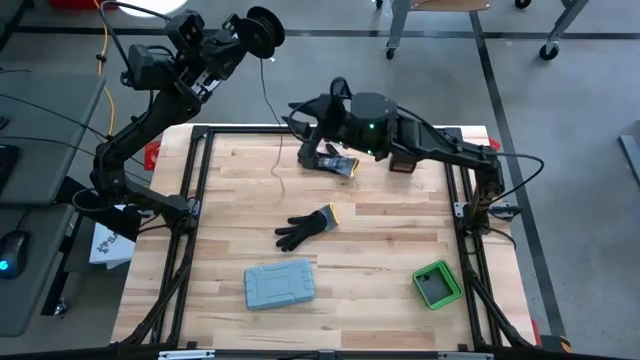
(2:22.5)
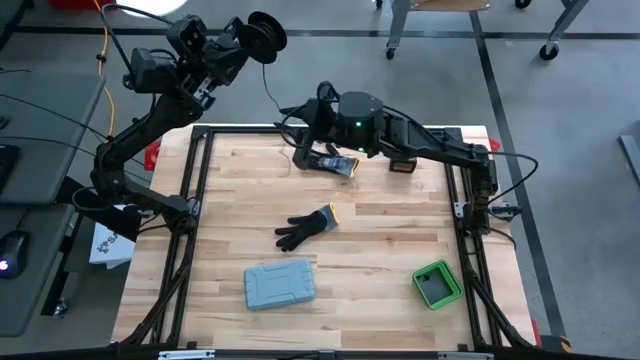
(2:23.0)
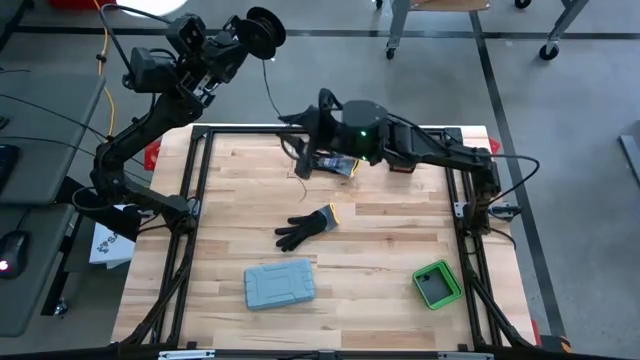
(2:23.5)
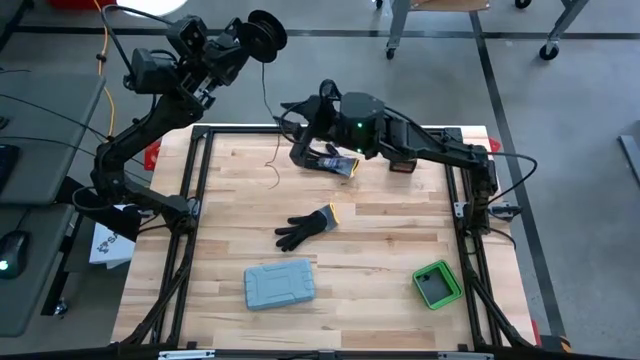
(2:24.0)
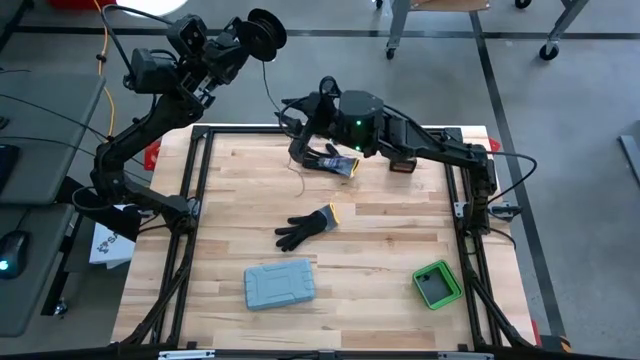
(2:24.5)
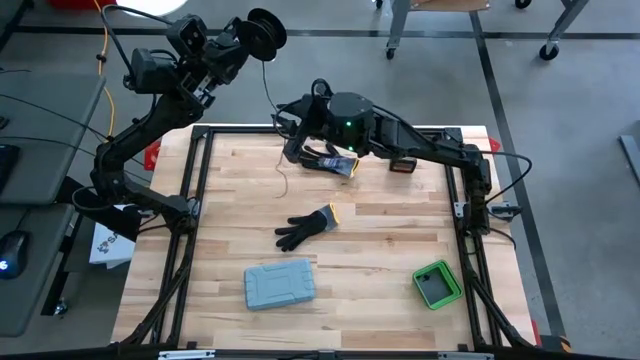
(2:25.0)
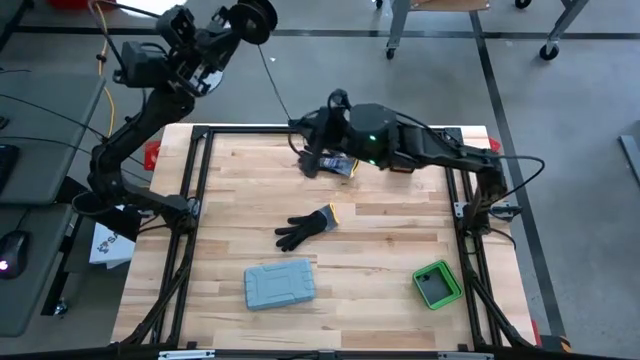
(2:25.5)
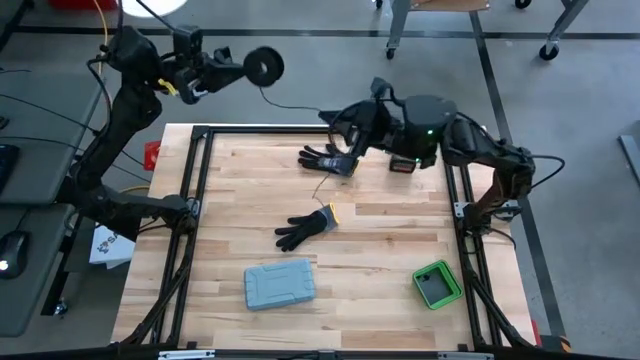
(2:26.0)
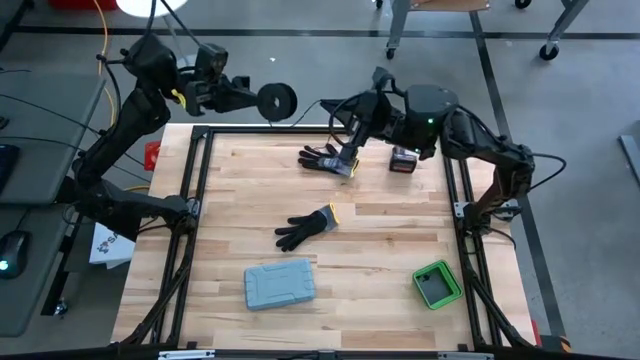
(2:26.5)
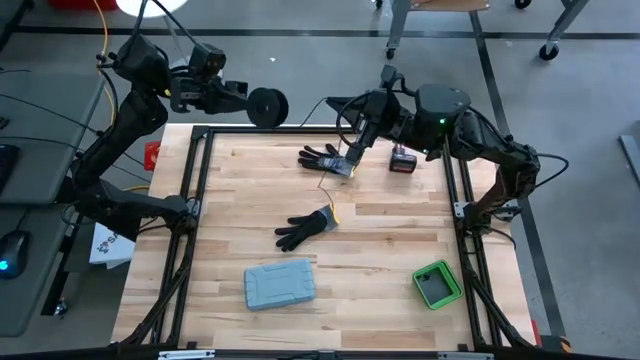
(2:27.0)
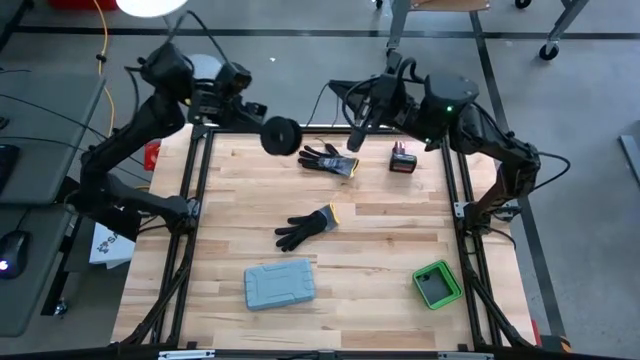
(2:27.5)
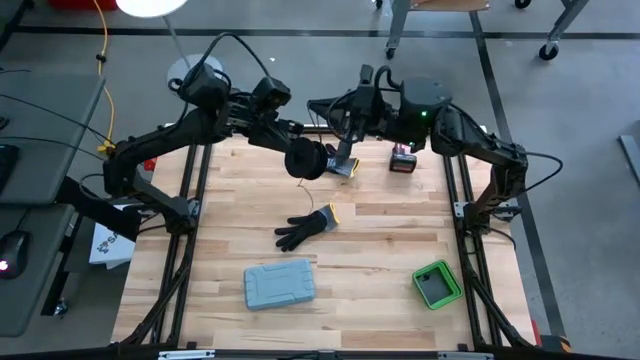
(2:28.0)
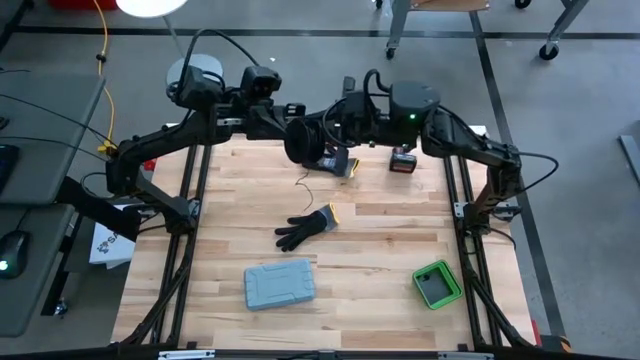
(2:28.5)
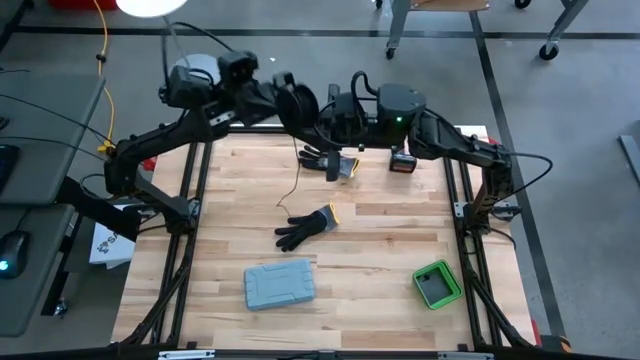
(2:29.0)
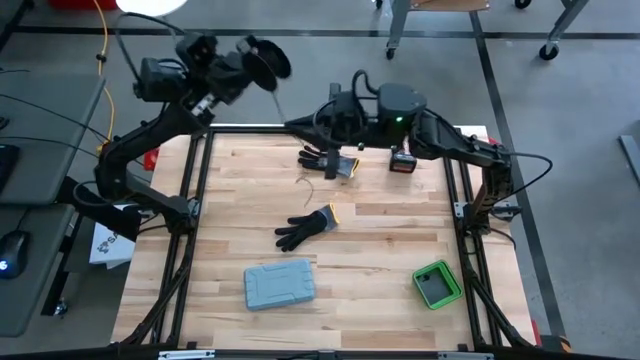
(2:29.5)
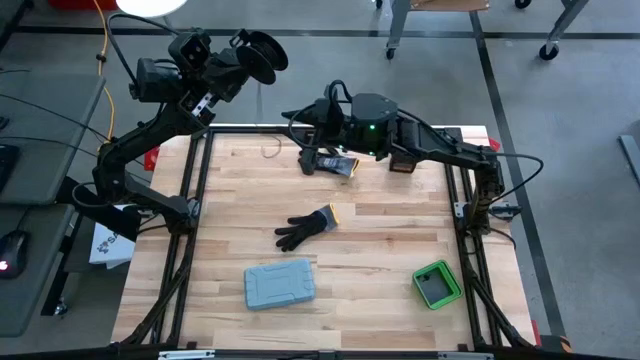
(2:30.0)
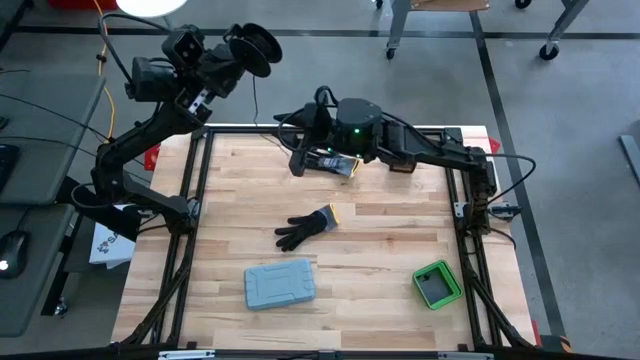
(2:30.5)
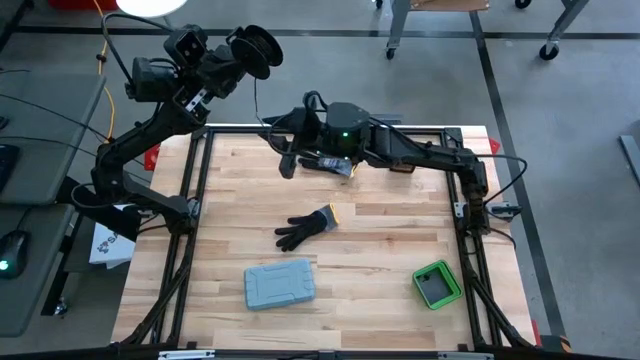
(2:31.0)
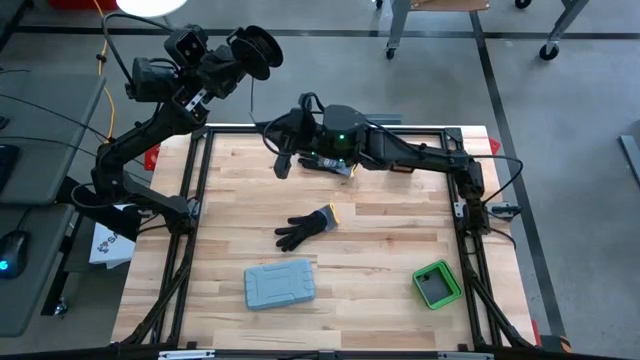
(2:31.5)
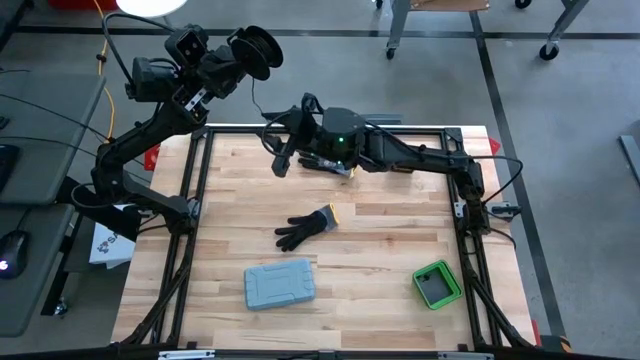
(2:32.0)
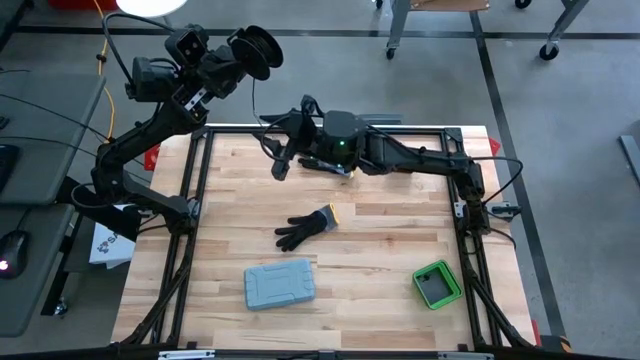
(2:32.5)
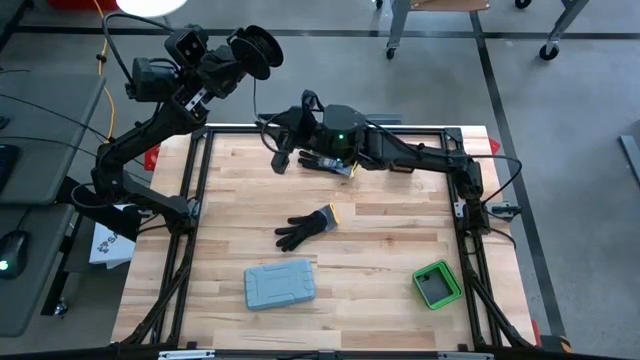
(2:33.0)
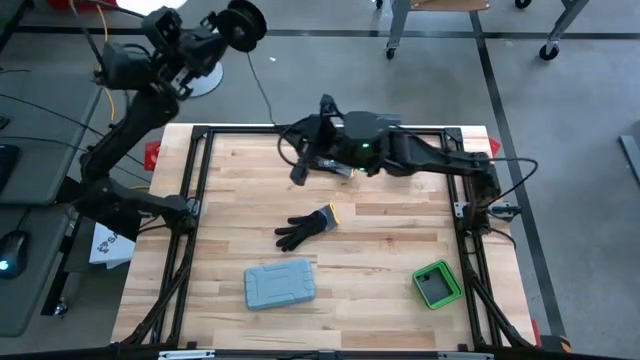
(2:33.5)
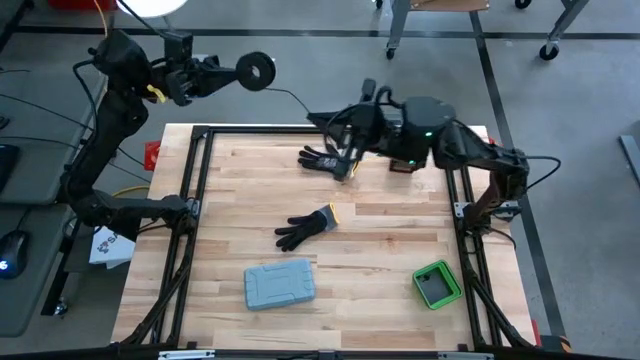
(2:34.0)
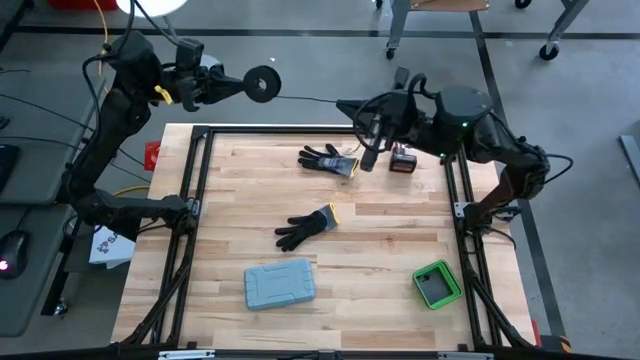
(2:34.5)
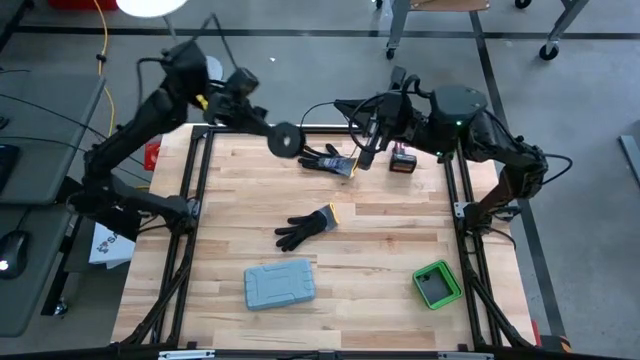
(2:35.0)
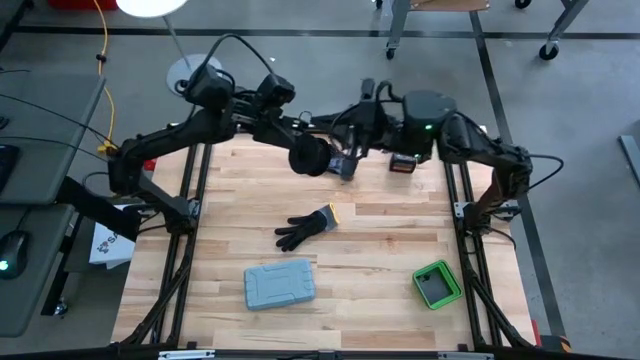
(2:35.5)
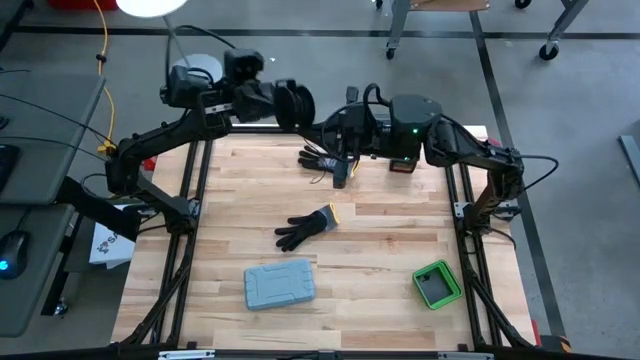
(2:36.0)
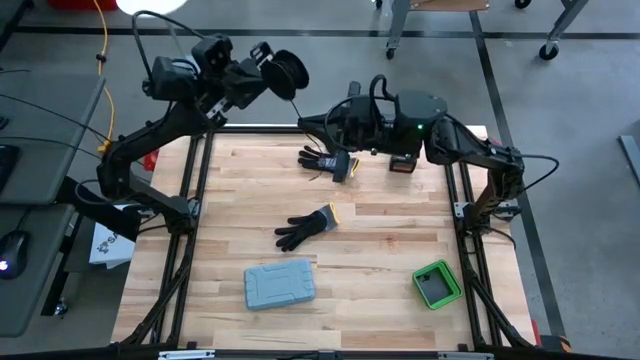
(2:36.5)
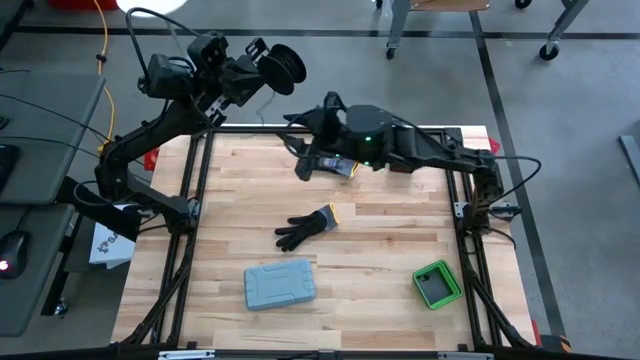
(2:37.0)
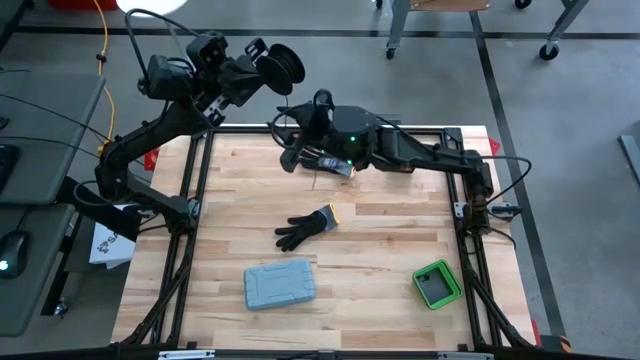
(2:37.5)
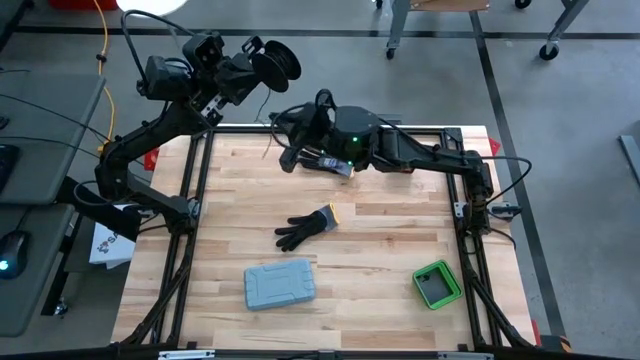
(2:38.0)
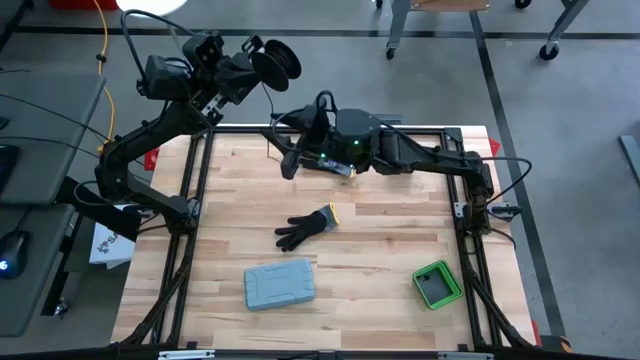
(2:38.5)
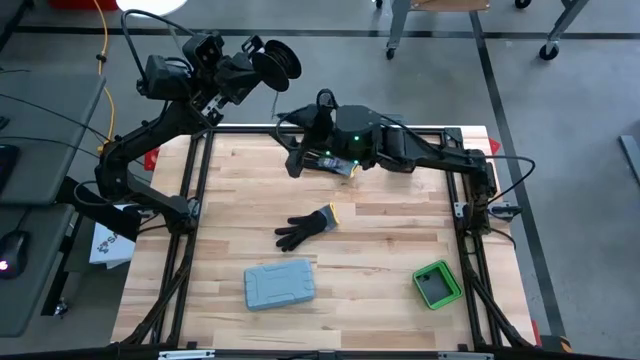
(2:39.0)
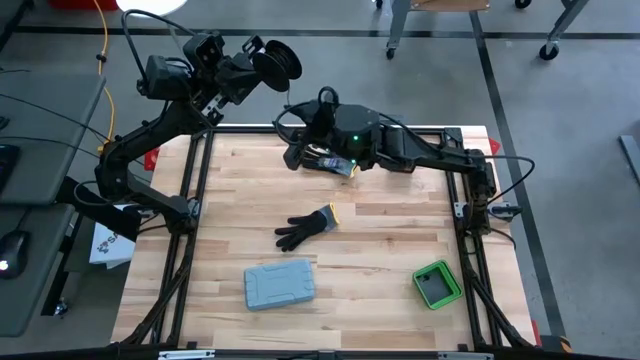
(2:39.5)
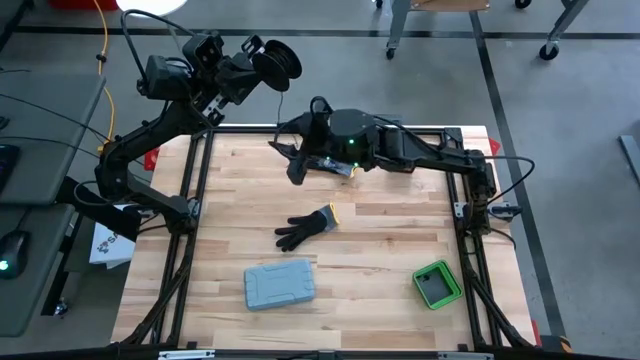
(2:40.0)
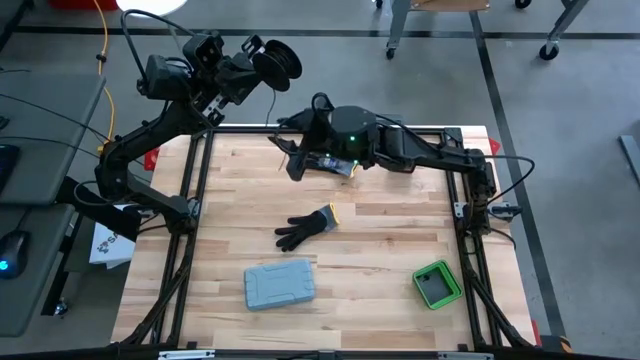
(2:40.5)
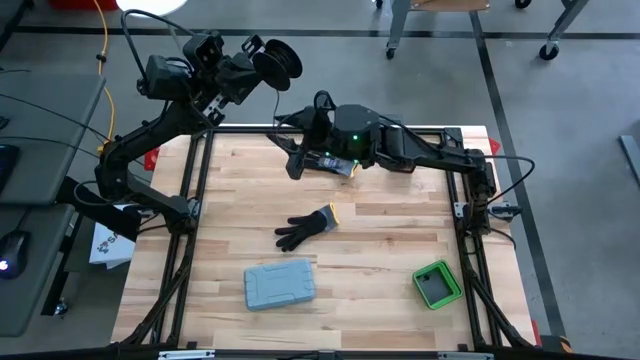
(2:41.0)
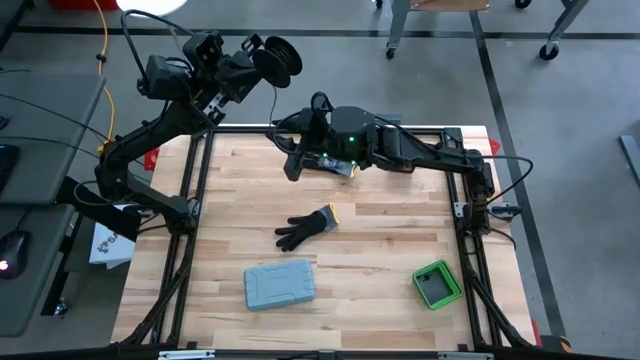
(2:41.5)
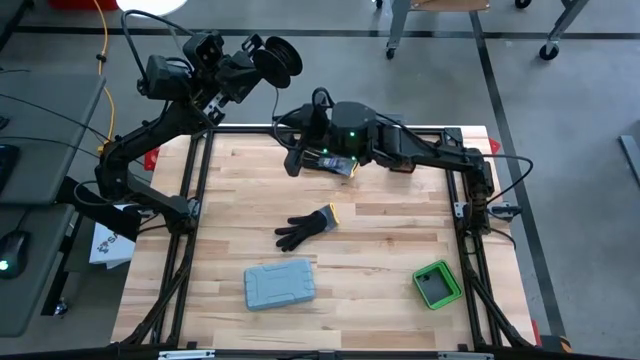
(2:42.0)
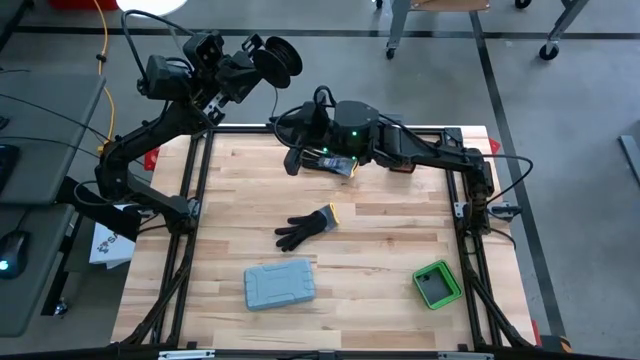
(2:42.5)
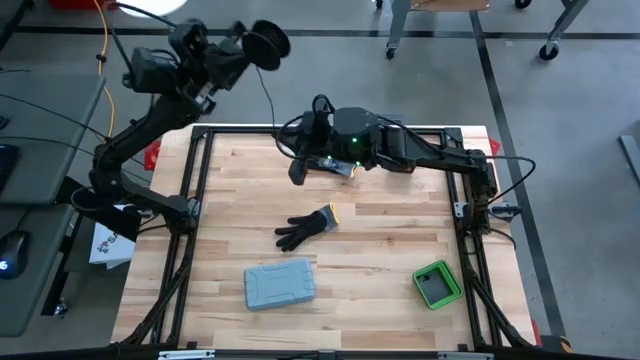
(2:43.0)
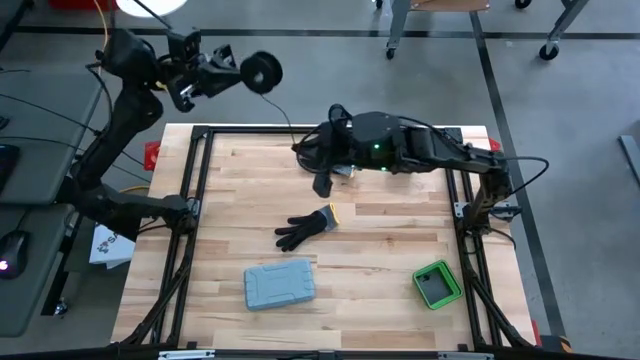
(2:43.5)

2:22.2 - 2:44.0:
Task: Coil cords
Coil the black wire cable onto the black spool
